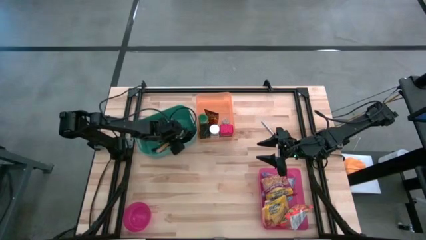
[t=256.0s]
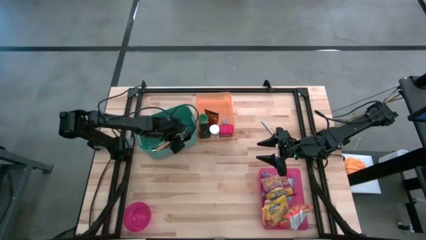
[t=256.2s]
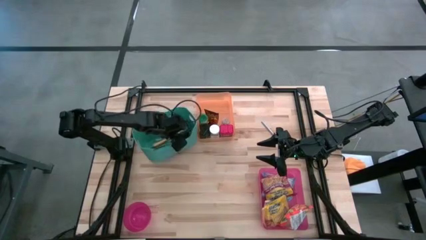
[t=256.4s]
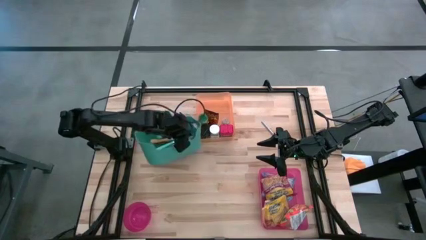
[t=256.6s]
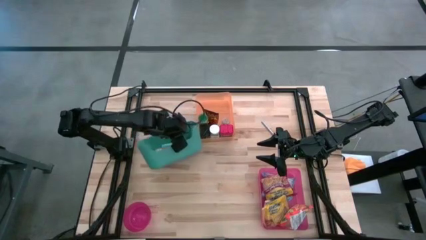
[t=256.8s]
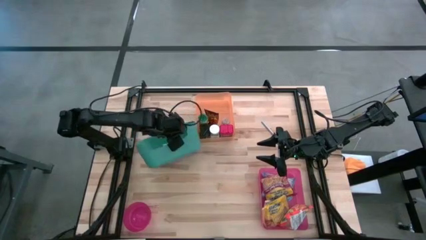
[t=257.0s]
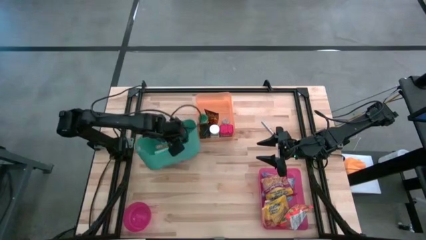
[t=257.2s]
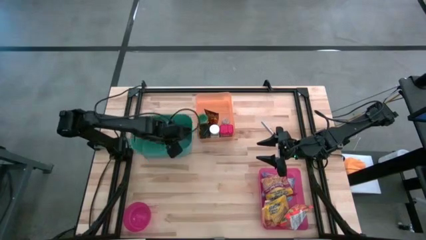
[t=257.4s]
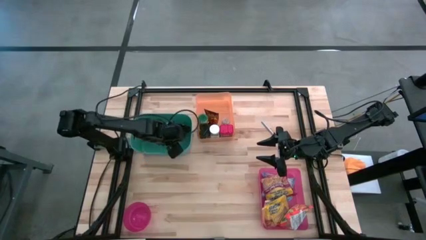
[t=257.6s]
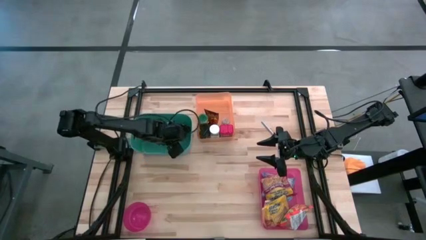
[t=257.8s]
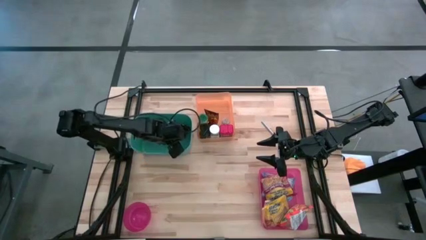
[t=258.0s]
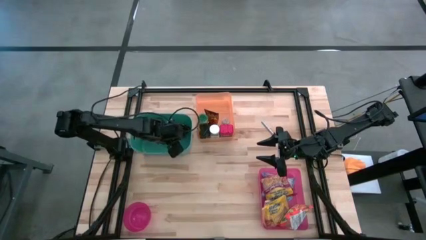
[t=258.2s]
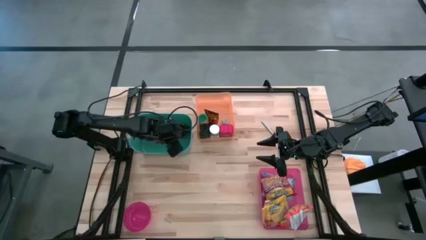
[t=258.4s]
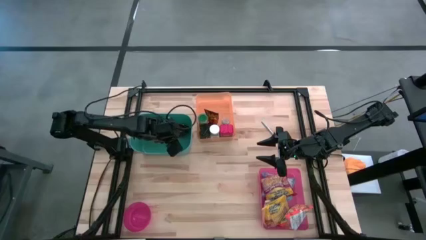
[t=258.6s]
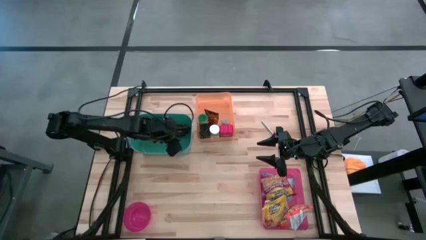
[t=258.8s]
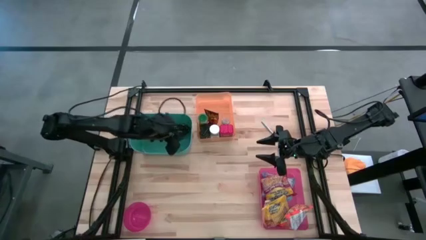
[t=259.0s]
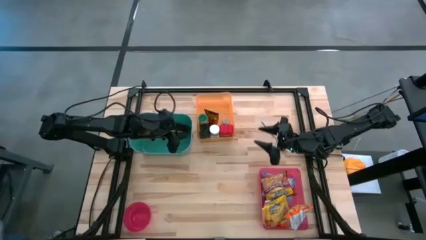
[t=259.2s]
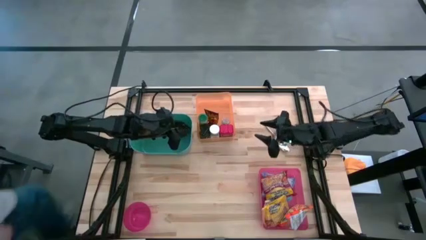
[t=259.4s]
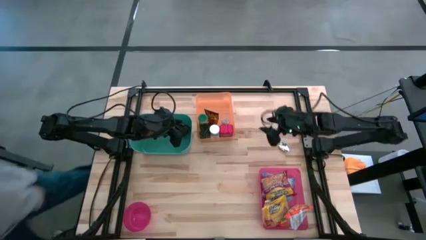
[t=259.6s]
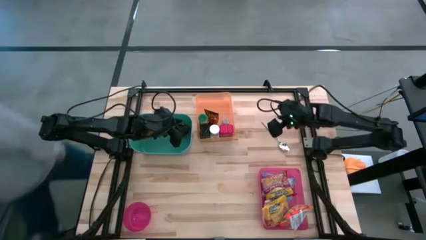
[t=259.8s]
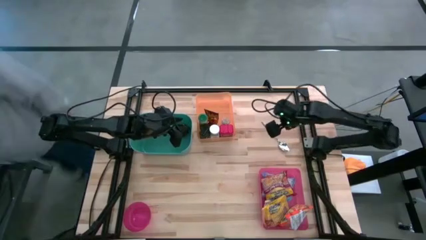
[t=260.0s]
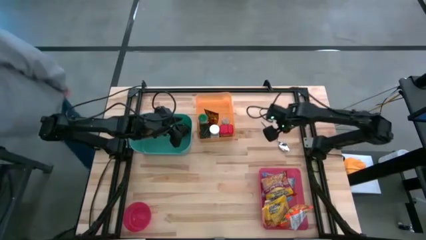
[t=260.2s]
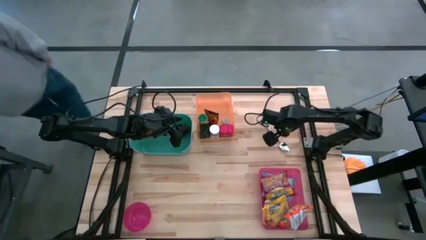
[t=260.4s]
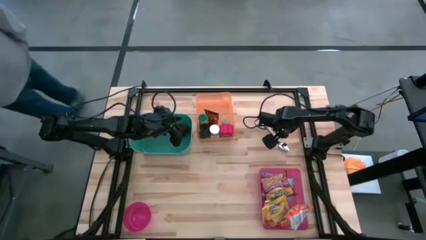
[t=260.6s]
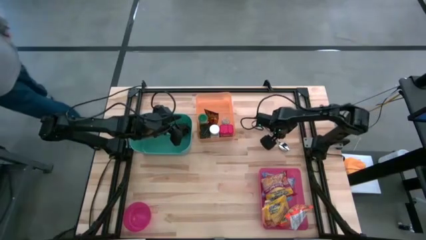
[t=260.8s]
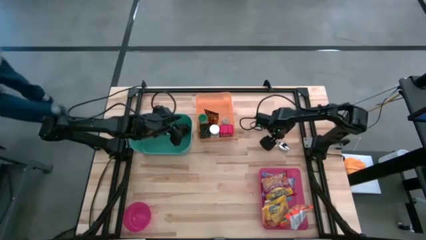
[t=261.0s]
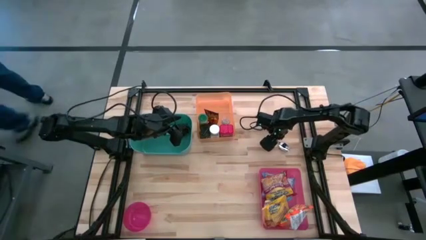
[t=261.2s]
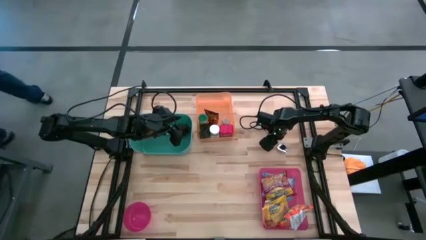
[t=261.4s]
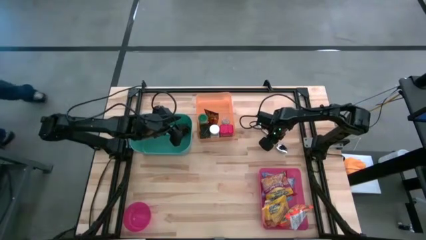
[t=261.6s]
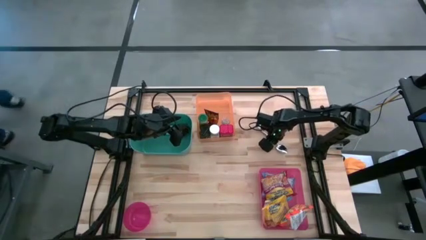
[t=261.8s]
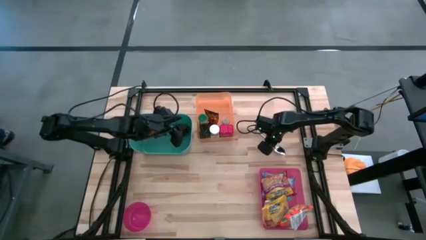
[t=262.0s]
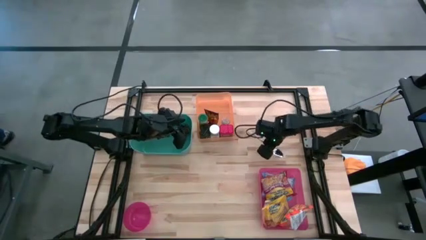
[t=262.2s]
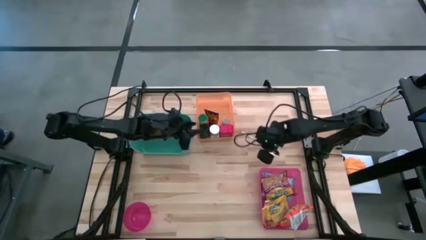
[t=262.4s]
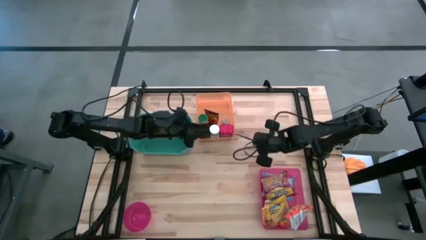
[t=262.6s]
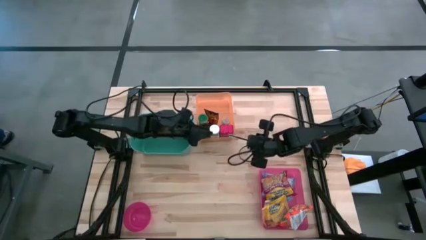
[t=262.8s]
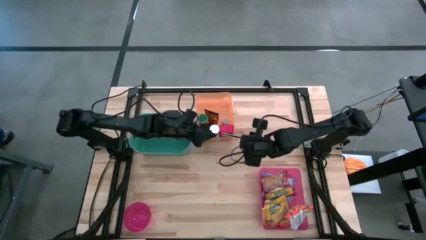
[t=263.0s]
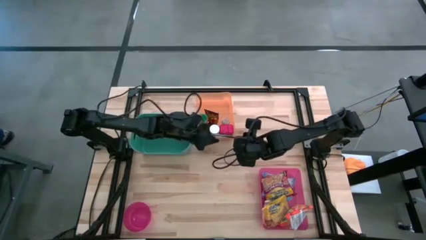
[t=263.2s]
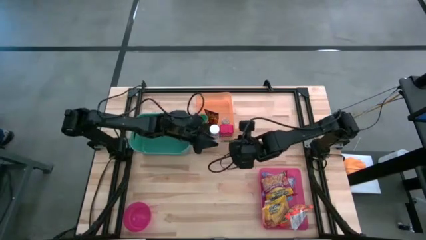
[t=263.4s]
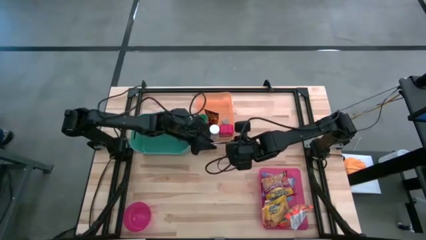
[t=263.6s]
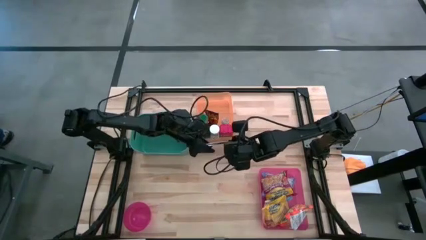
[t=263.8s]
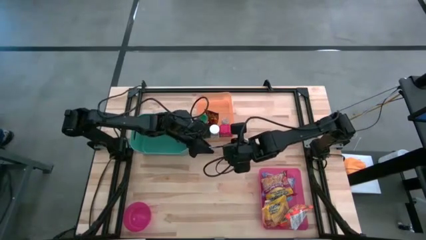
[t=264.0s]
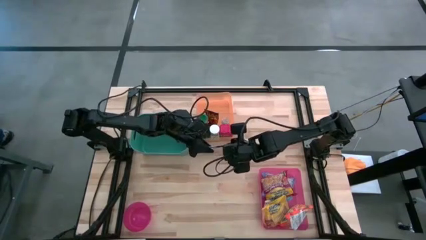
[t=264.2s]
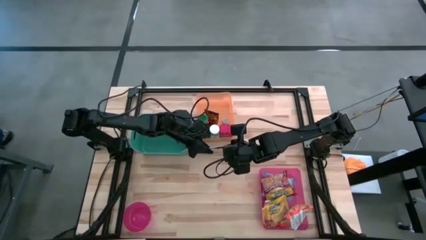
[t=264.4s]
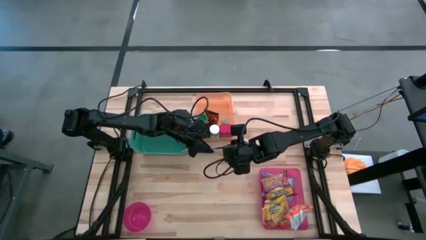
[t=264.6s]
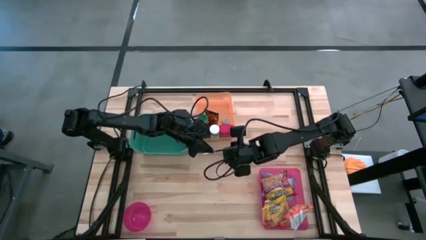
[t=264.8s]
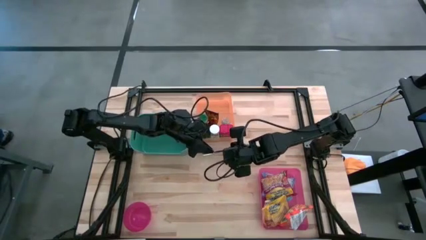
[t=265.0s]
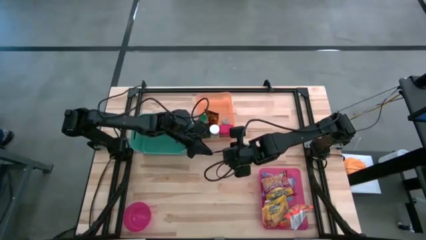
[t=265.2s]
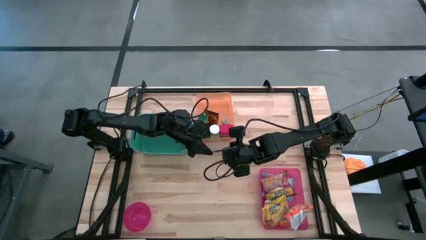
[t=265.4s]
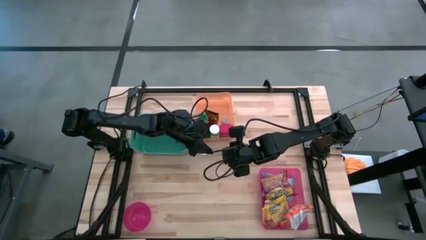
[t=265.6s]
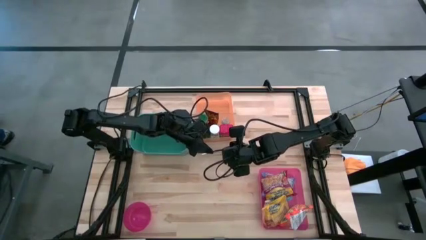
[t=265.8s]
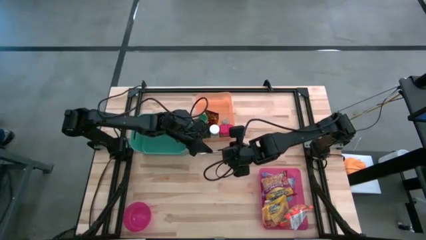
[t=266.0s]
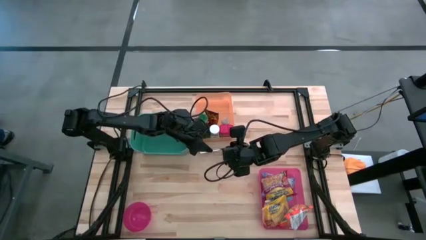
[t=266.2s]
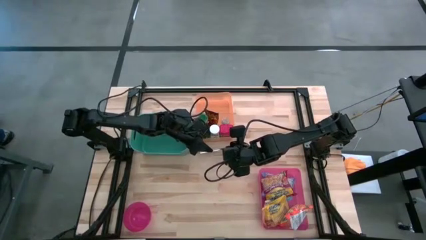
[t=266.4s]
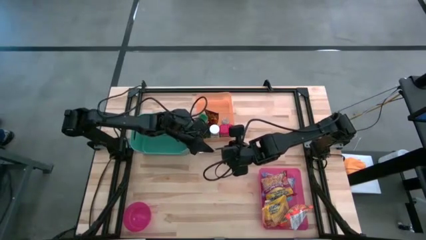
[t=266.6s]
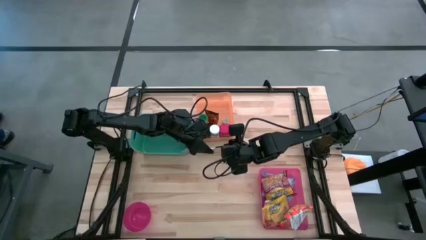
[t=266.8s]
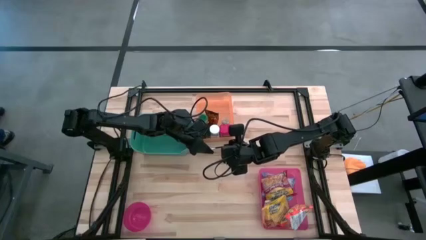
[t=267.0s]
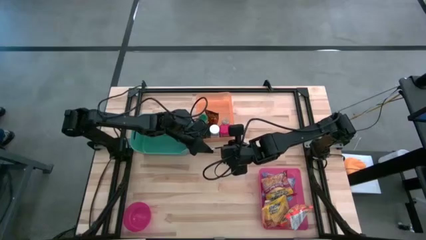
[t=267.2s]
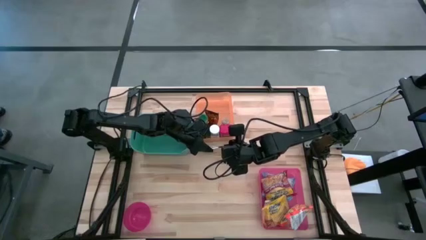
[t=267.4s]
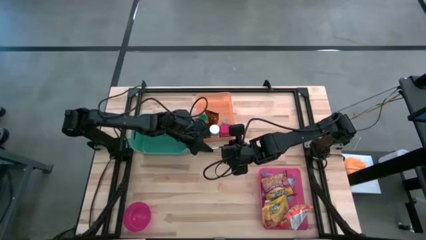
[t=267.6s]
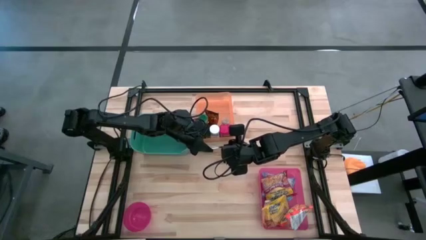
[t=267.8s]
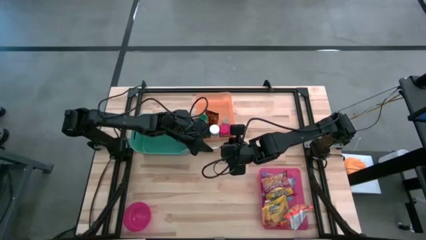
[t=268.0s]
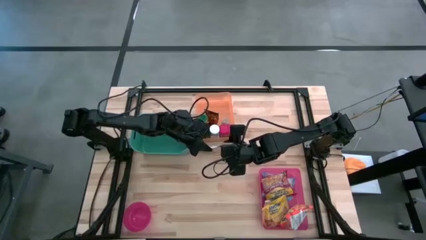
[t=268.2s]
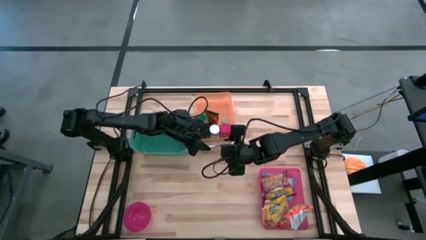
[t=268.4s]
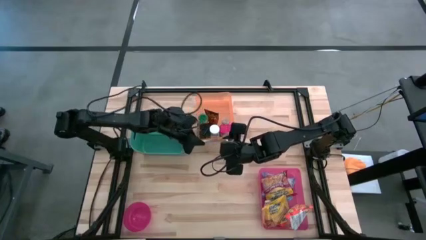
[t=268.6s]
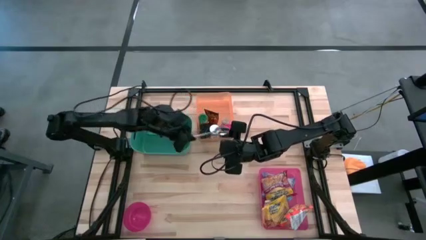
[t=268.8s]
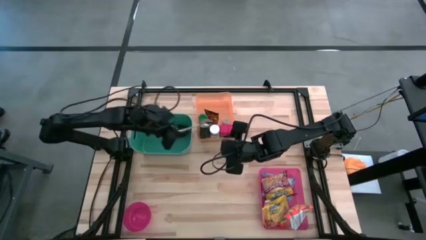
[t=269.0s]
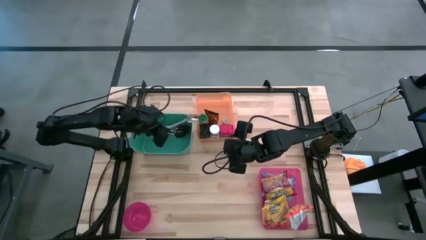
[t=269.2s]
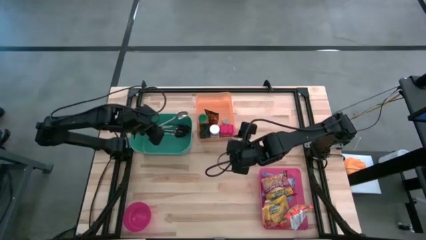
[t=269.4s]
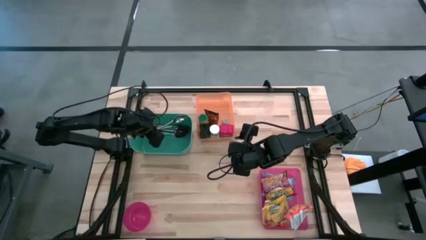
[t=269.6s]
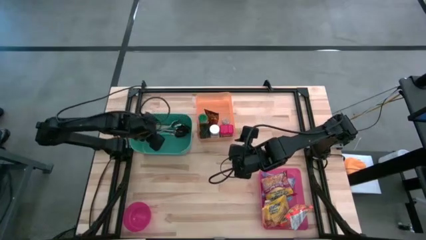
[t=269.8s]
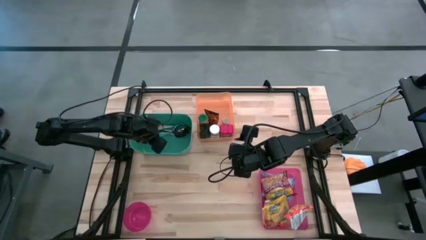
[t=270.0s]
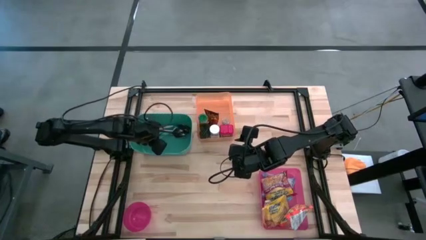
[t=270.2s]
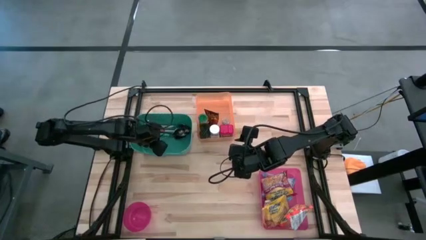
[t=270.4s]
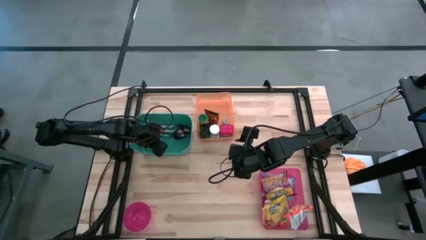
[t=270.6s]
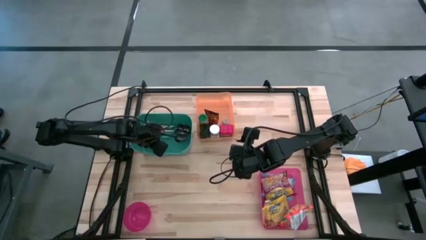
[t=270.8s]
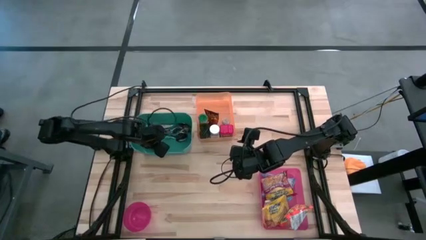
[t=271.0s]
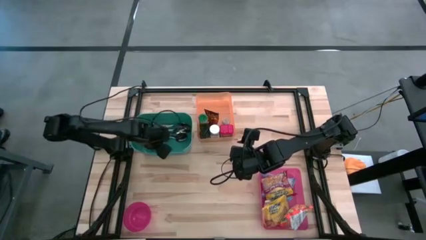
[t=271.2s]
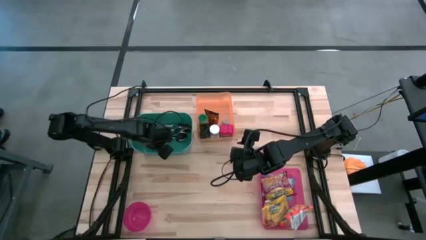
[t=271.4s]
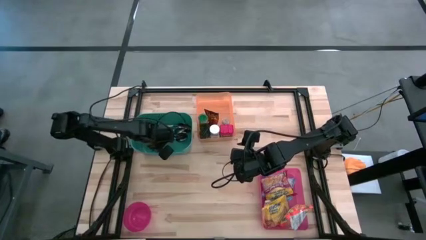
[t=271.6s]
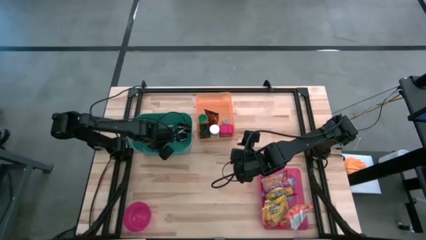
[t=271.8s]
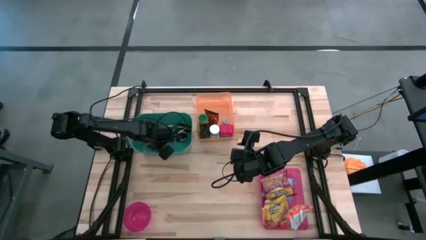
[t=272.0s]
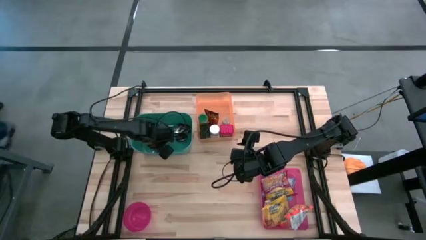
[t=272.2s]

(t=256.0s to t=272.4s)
Put the silver spoon into the green bin
